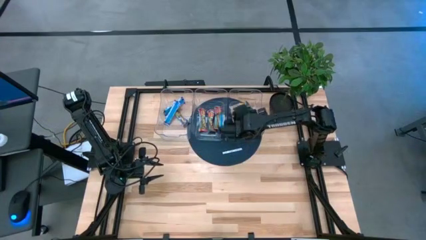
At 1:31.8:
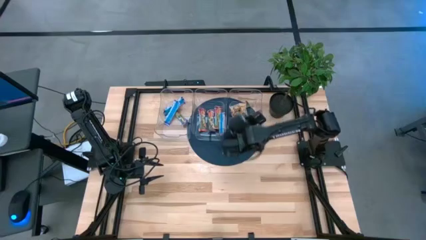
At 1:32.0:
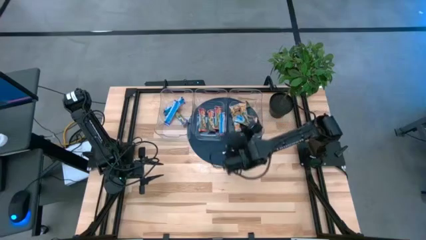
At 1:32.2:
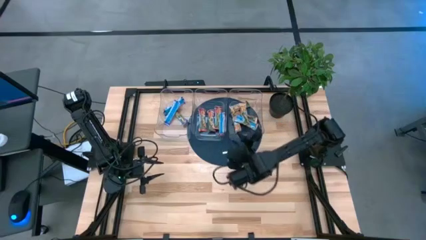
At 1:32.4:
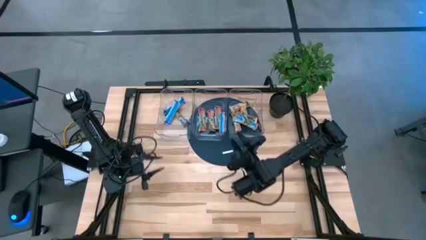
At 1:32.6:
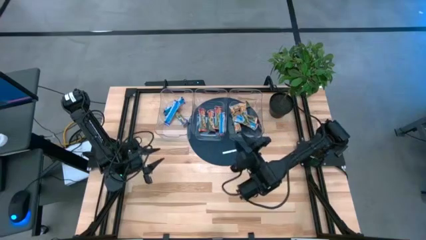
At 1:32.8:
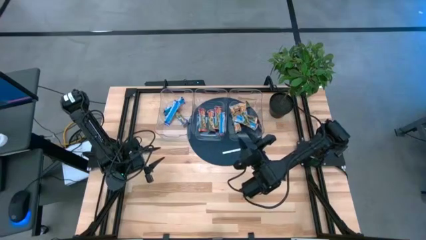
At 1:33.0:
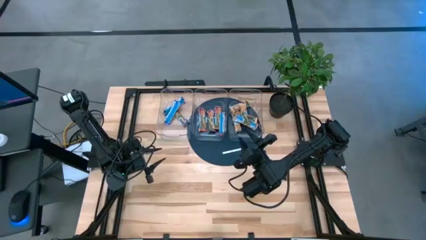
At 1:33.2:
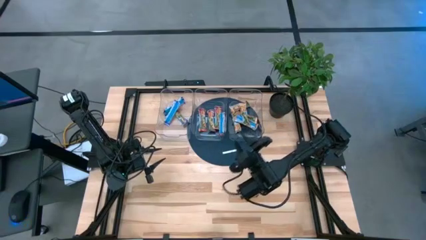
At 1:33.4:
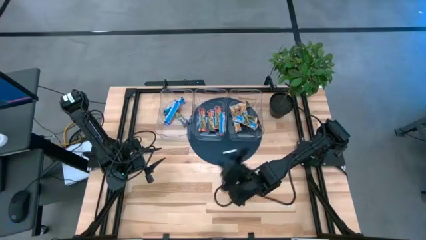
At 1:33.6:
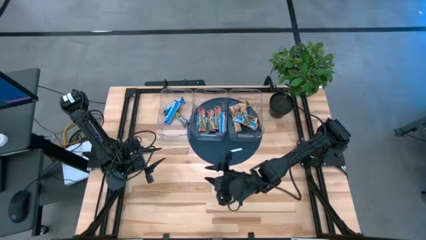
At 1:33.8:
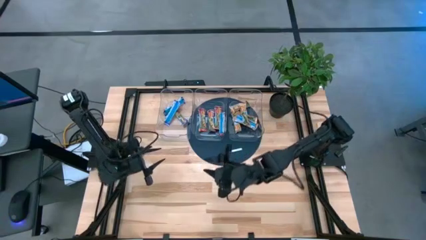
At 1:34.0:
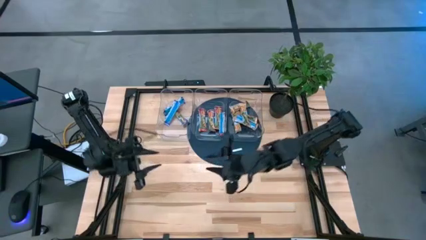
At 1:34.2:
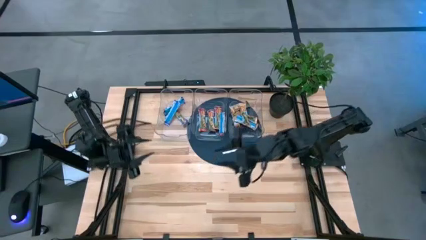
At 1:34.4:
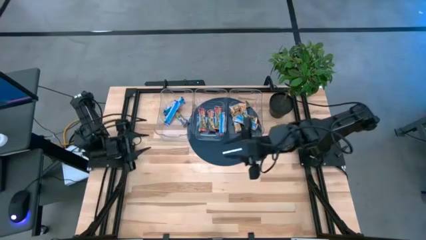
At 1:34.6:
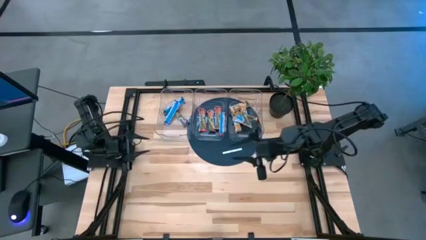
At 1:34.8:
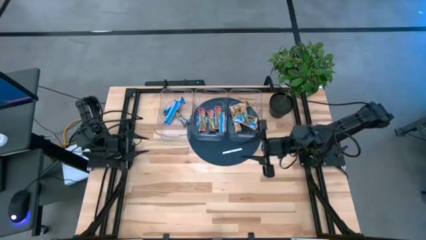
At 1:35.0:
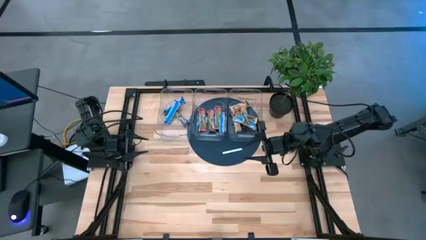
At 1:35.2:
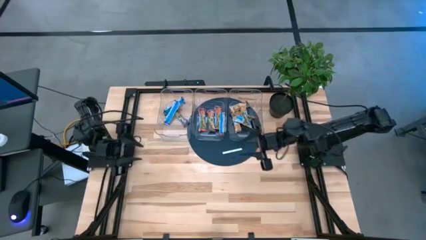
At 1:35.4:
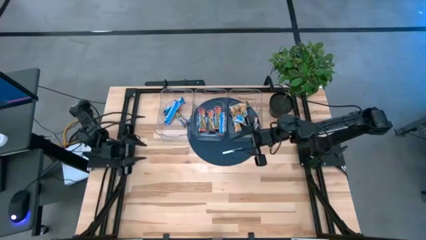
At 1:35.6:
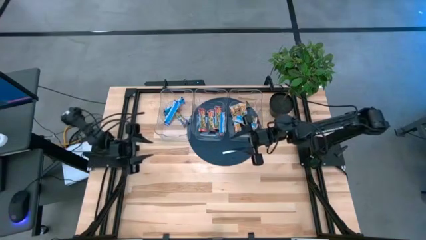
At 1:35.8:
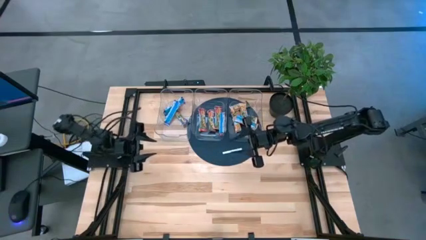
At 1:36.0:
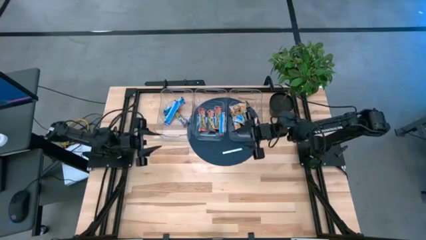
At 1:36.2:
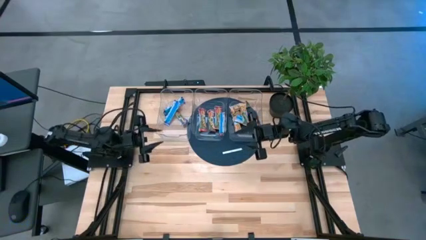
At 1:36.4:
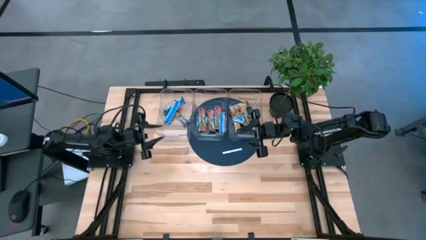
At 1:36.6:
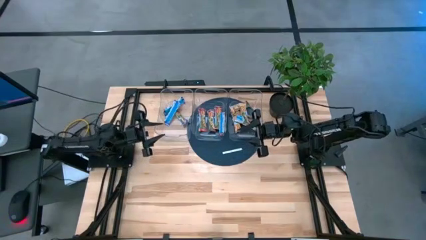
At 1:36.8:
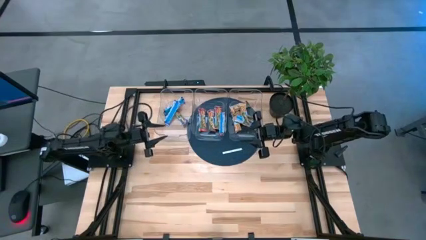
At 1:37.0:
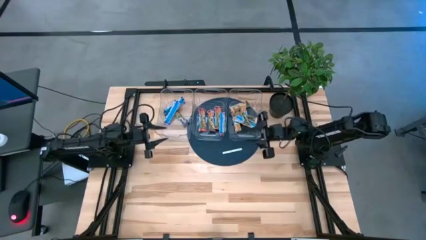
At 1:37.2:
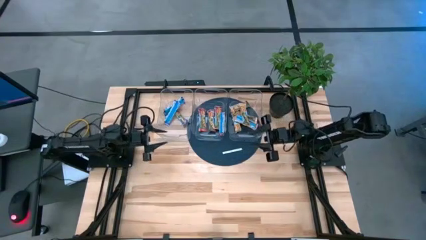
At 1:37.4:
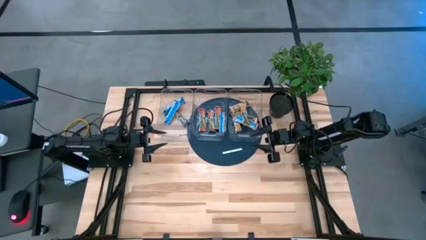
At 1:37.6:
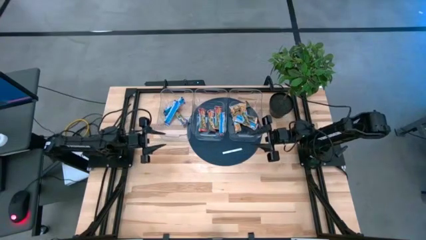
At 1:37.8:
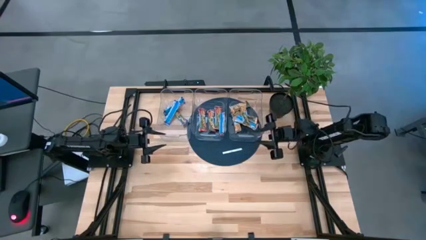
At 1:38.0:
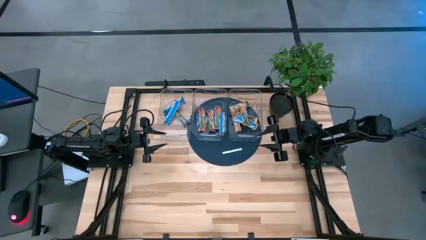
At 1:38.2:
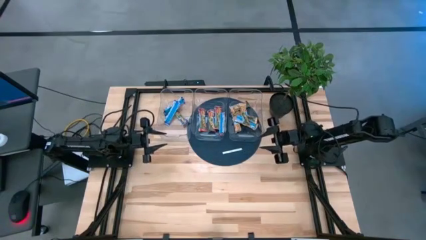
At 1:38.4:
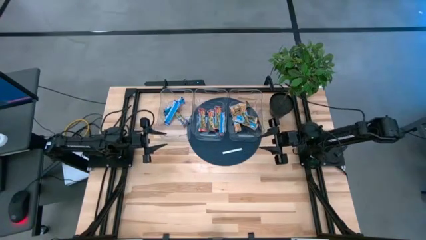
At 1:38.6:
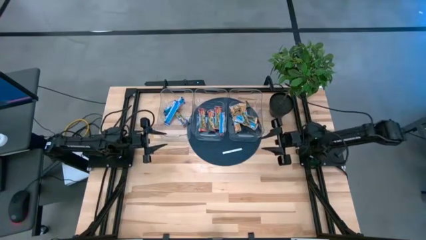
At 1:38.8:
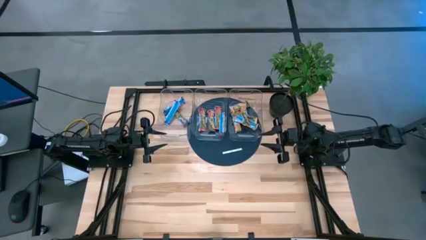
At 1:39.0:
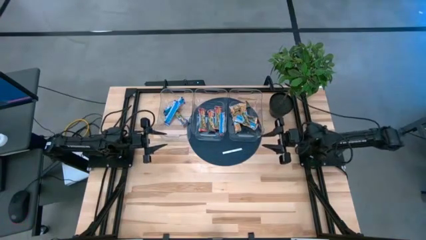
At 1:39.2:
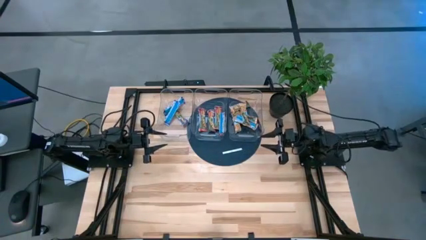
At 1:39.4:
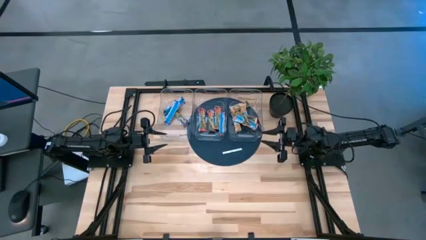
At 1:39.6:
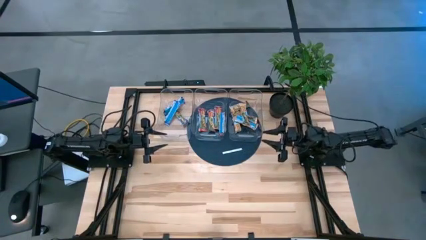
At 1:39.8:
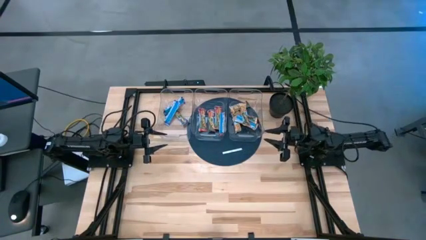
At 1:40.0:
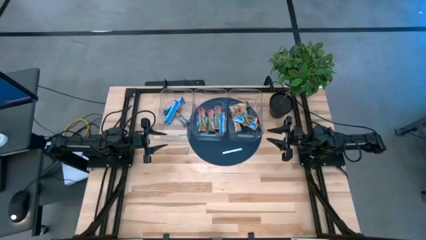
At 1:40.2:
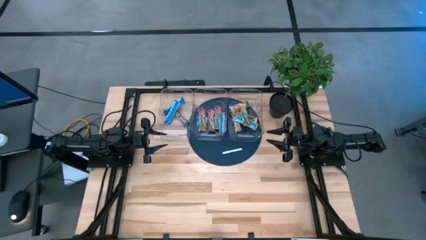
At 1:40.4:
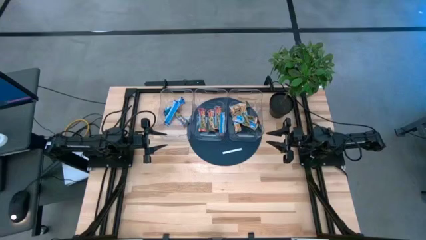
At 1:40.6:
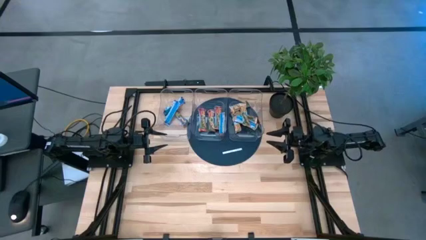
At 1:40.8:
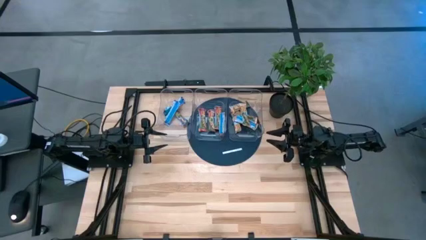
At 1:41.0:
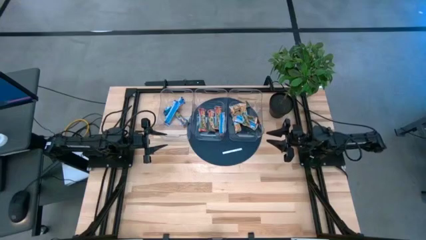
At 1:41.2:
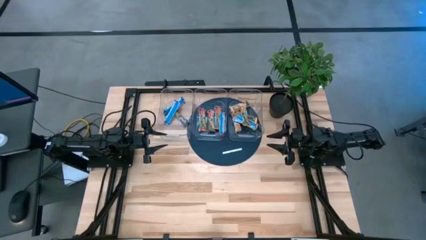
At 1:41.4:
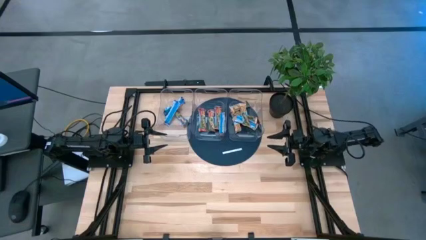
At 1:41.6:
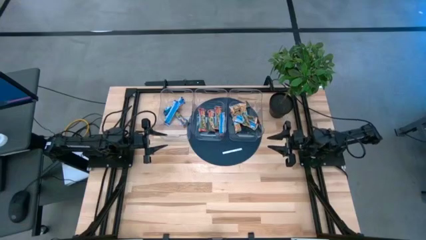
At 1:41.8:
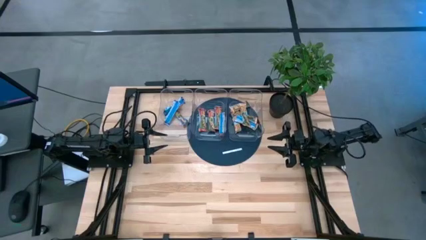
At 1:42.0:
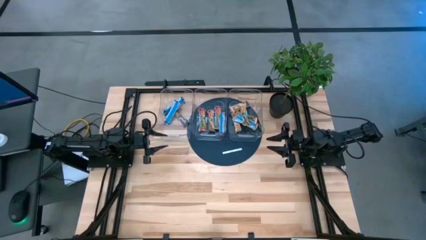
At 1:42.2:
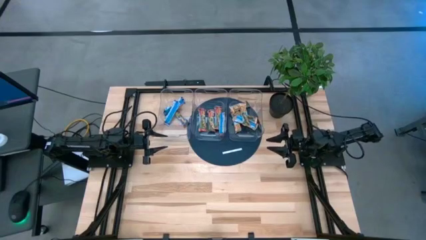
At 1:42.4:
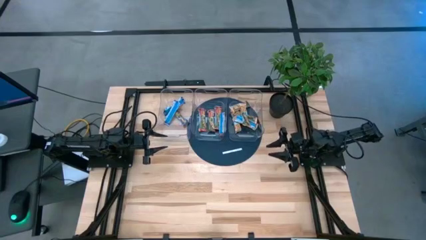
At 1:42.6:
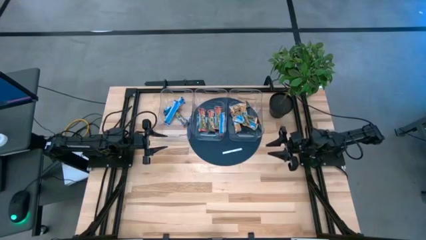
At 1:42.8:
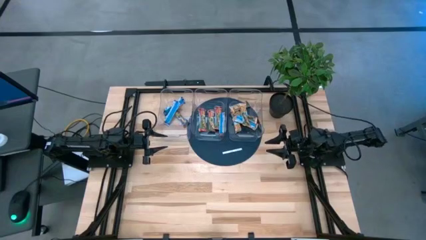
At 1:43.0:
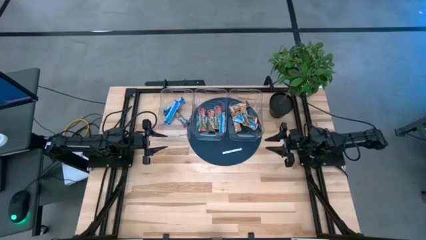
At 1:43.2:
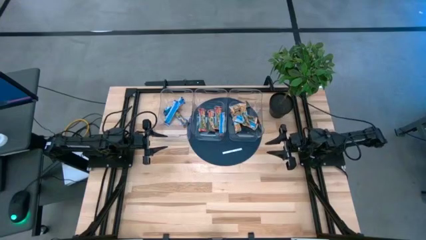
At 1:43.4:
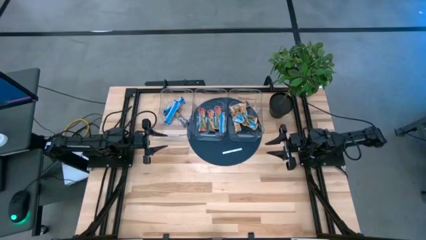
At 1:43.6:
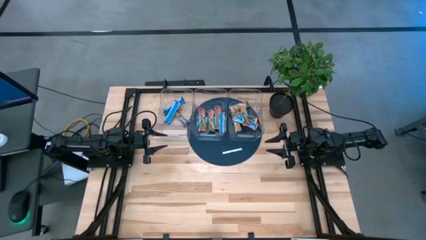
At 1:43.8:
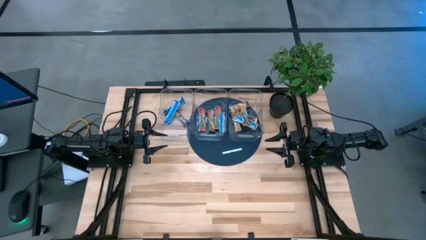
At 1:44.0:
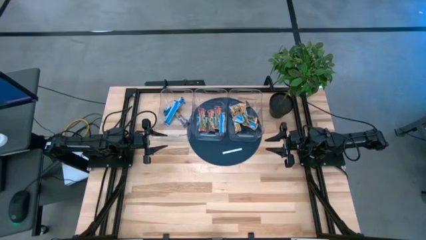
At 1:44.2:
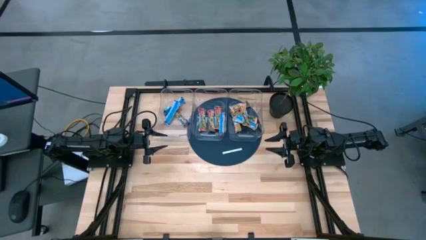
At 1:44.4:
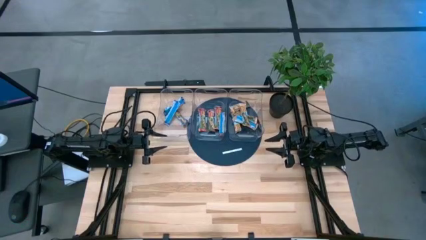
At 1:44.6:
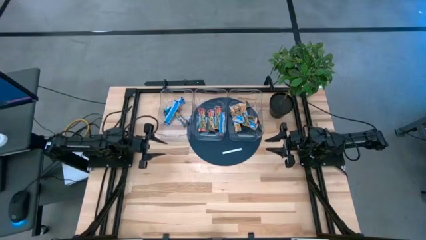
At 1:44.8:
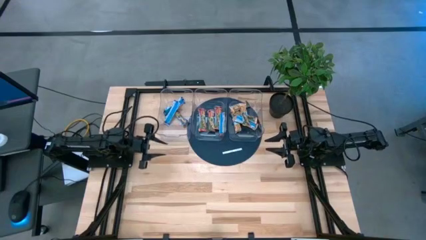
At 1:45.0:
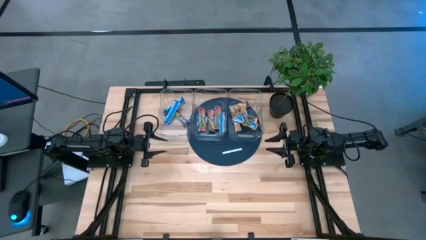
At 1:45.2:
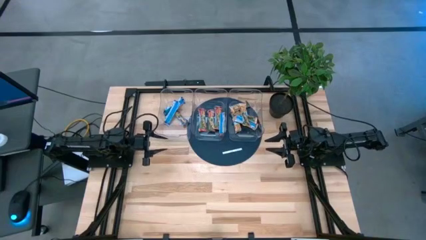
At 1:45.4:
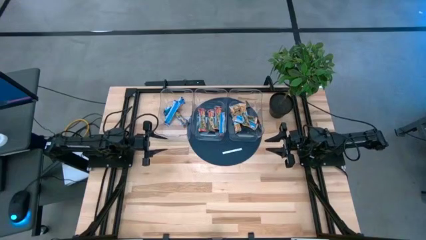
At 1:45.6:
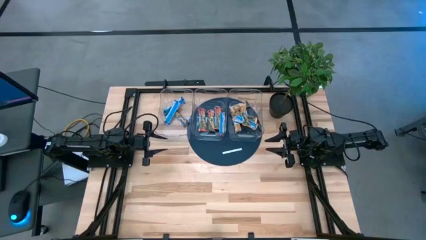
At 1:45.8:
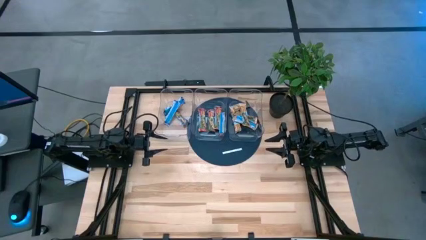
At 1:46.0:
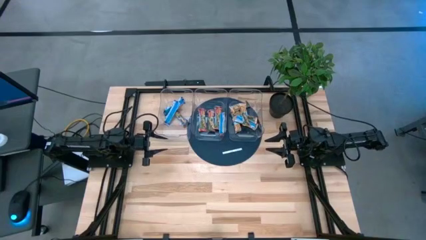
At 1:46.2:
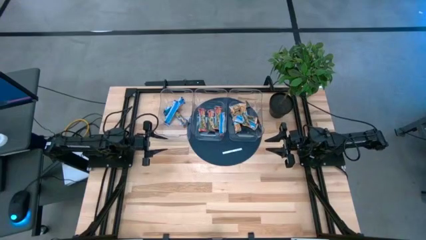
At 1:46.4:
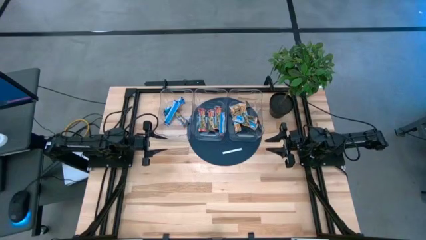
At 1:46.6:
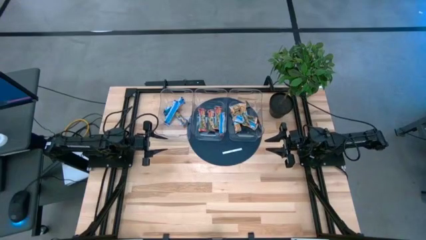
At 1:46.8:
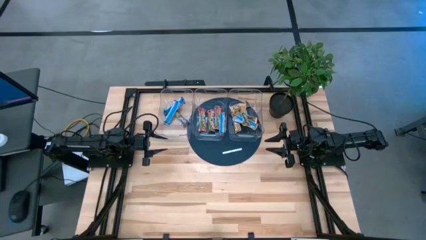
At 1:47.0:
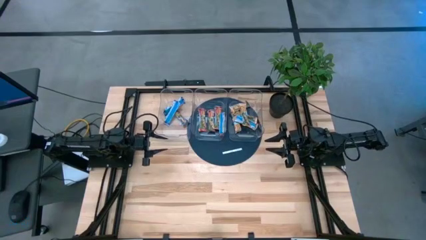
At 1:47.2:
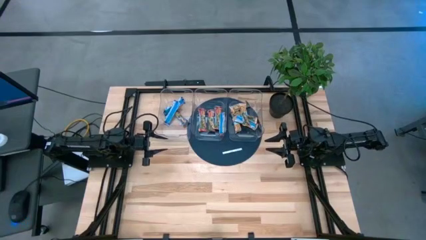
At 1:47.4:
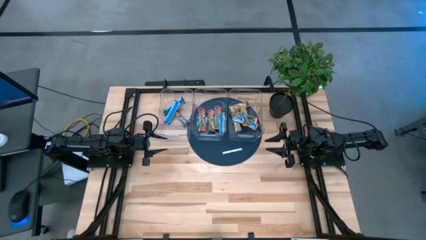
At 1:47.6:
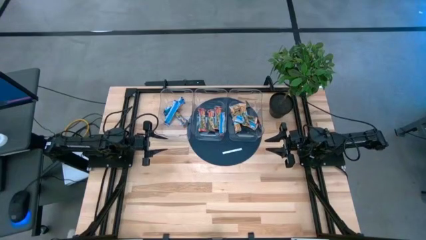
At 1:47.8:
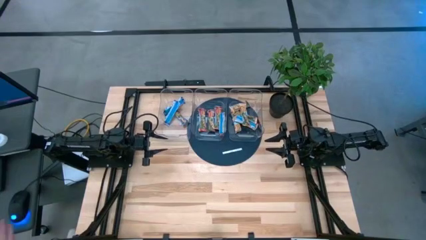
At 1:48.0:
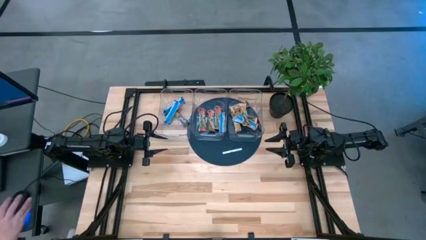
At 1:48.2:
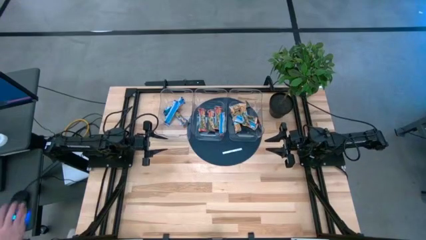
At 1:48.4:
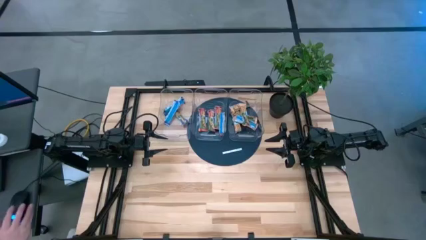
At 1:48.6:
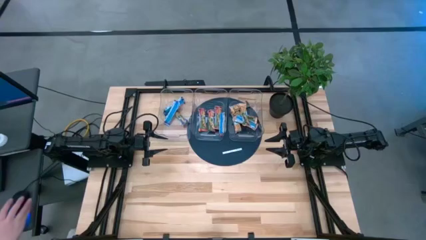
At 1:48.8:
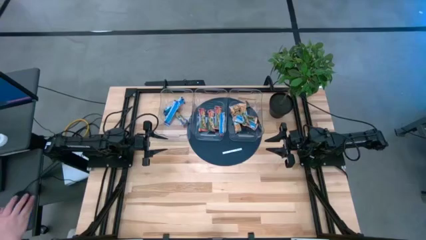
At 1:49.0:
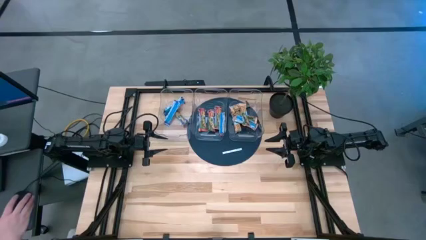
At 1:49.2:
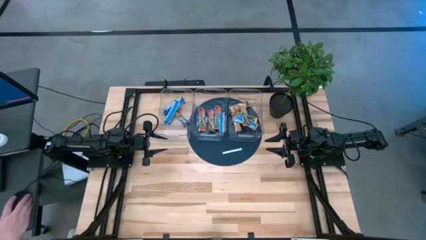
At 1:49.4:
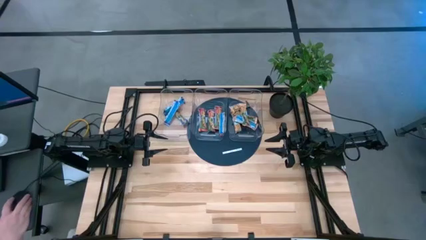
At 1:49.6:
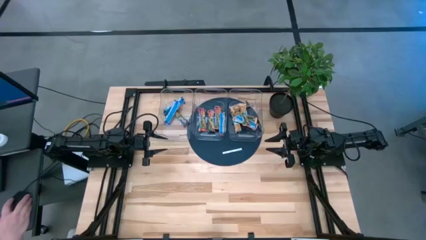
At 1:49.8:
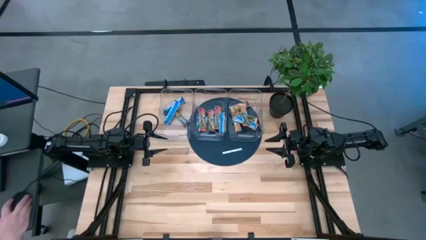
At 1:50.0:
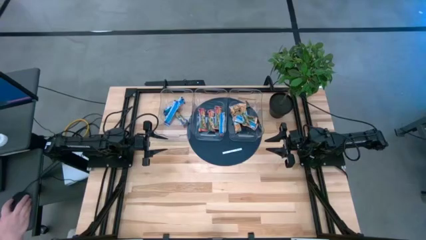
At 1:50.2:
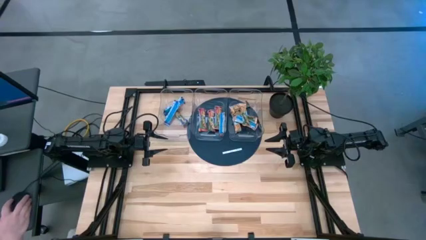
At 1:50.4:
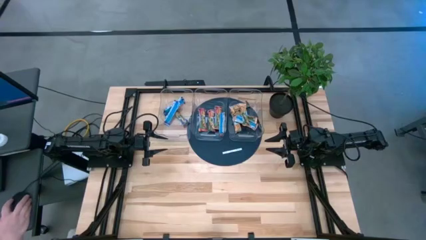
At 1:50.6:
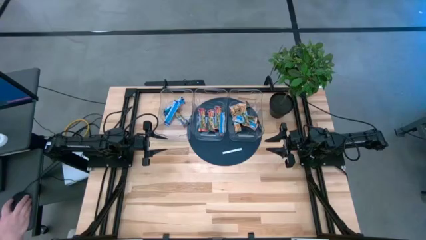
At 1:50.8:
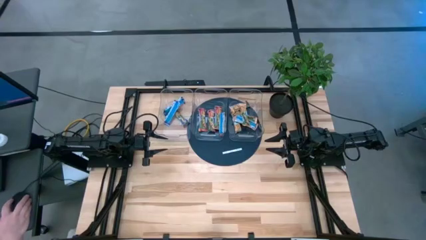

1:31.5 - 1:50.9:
Task: Pick and place Granola Bars by type
Return to Home Position
